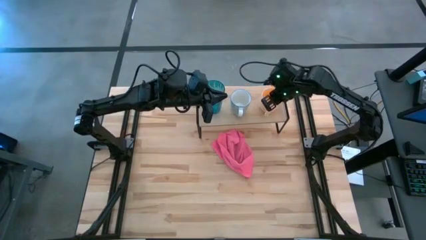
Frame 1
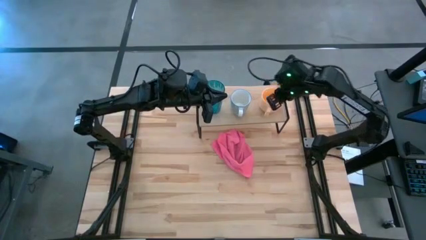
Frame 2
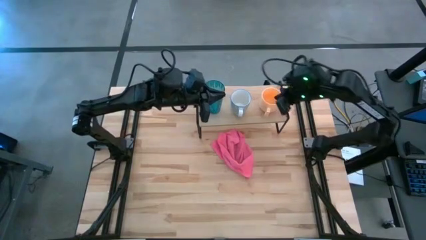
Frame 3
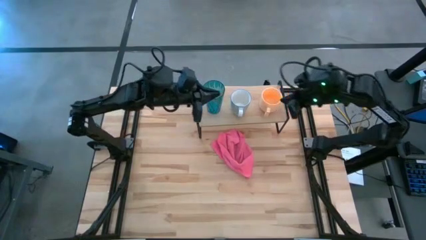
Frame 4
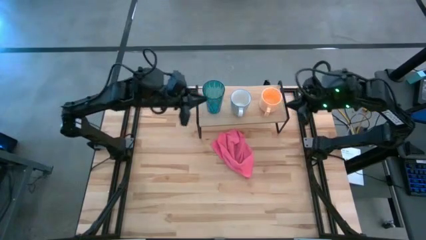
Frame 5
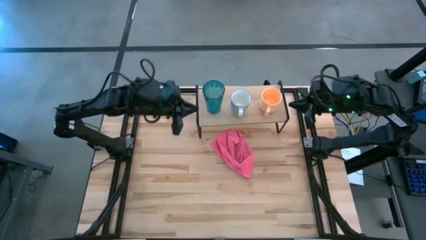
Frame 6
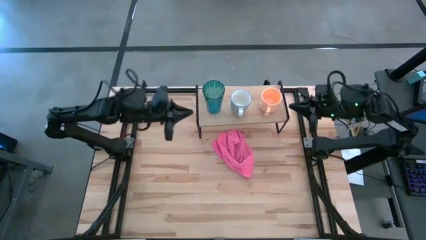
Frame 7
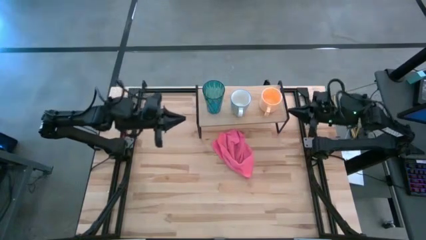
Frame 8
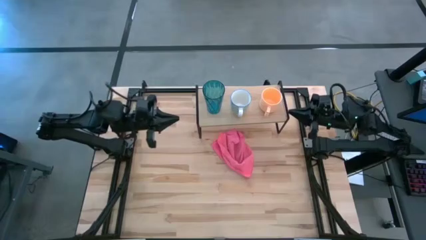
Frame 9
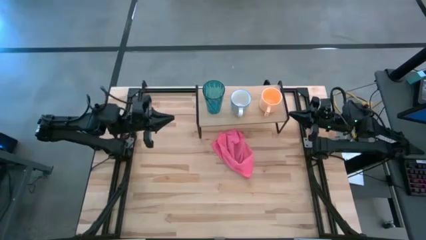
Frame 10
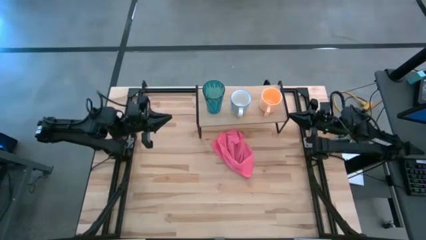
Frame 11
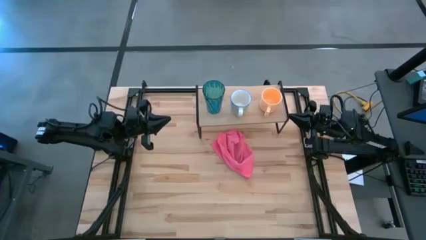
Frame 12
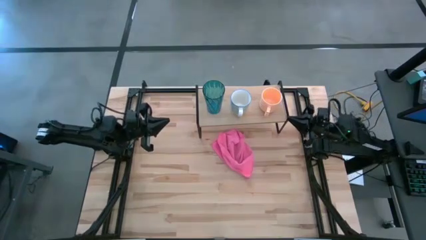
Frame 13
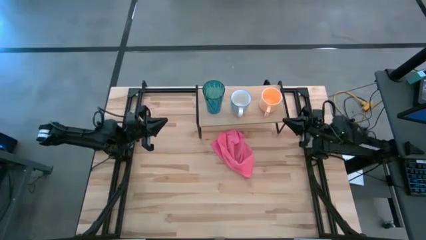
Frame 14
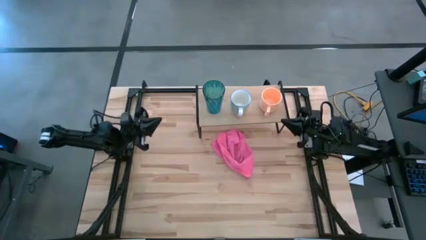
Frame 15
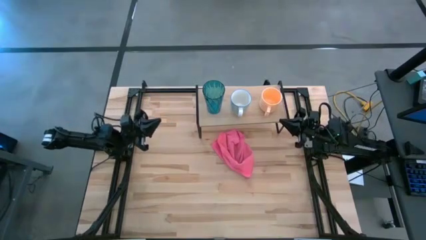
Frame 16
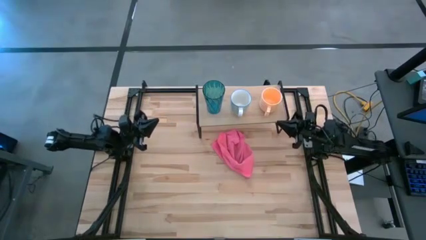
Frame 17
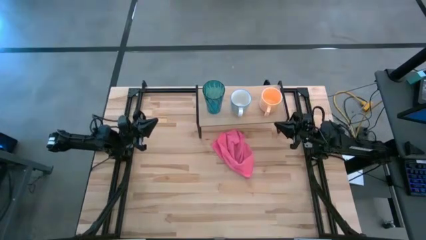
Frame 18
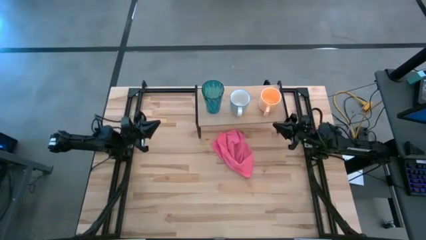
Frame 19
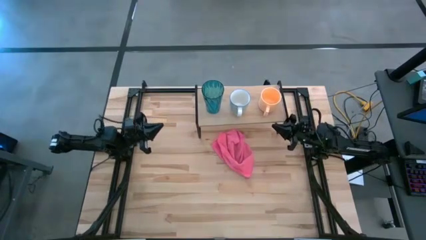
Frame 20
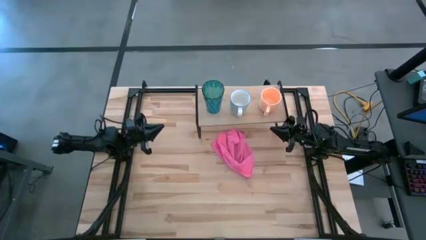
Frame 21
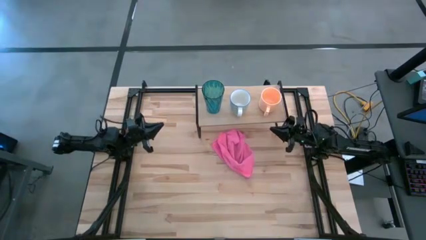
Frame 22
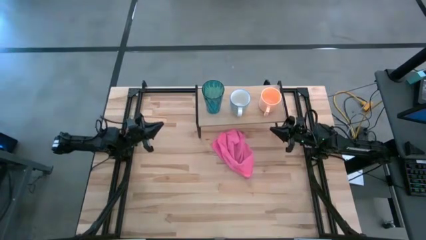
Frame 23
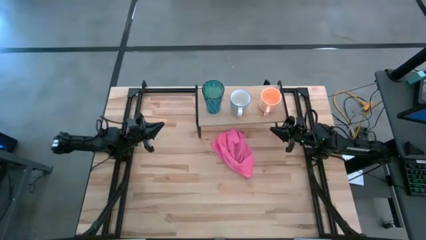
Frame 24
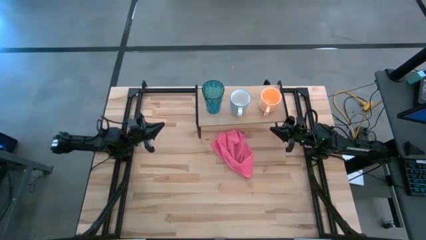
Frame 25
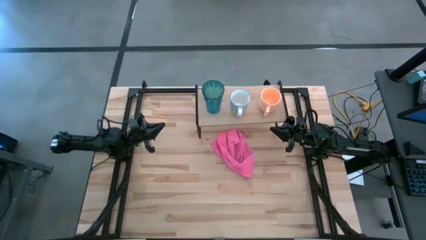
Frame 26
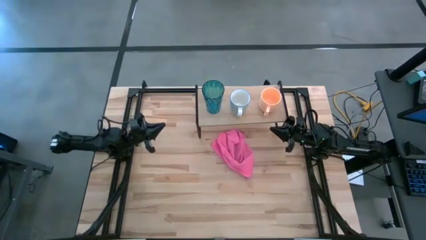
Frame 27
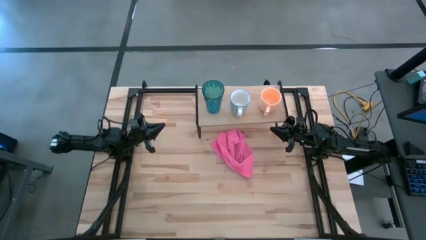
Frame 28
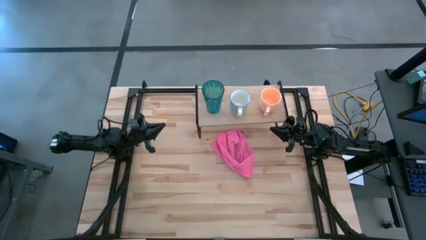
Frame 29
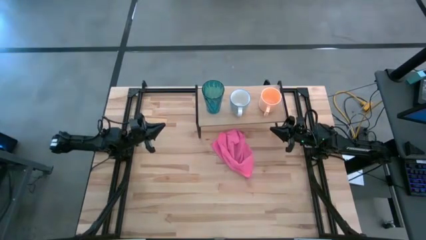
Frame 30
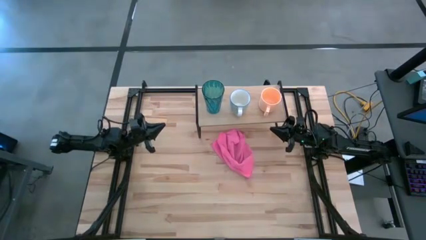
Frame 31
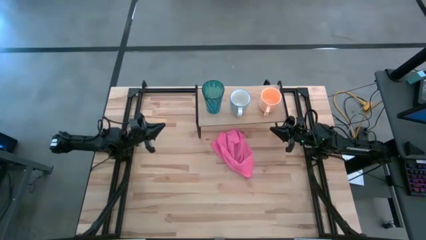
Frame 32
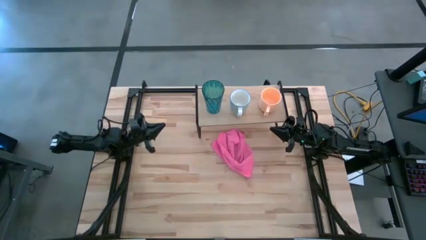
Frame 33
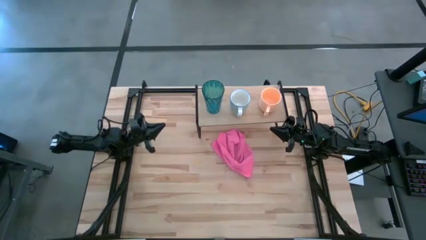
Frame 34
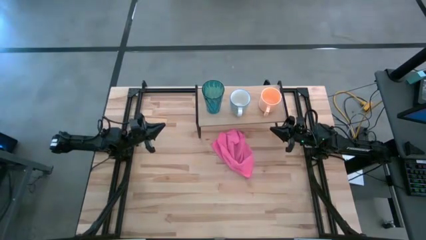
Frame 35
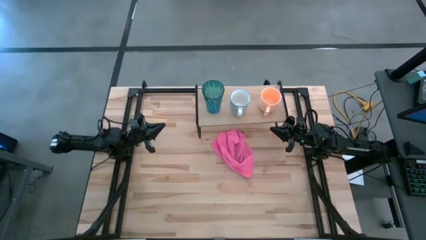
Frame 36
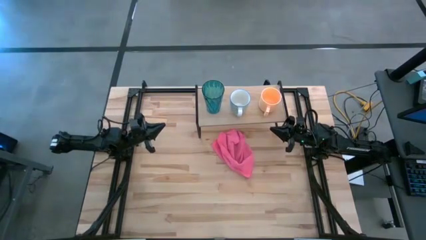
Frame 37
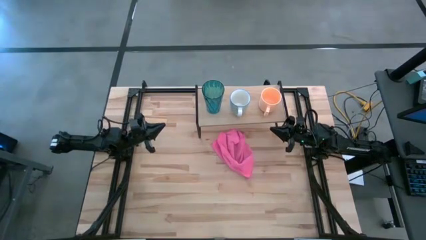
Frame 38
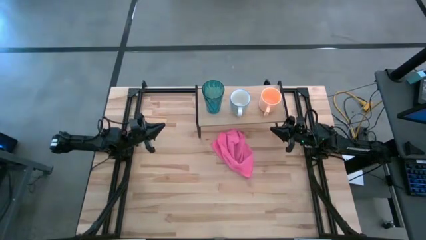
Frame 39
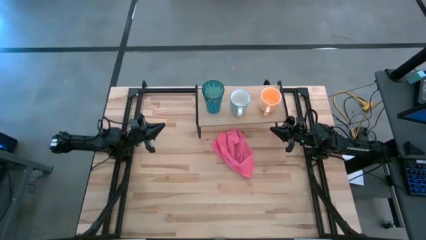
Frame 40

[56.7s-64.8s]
Task: Stack small to large cups/mugs on shelf
Return to home position

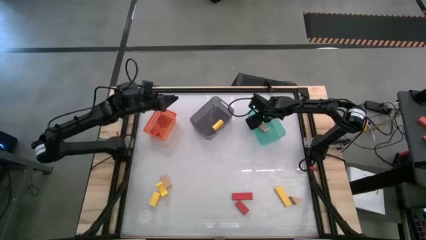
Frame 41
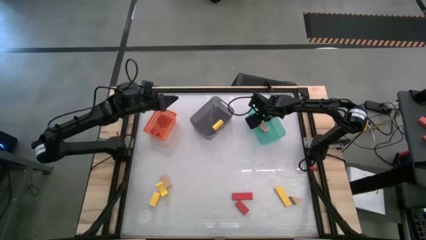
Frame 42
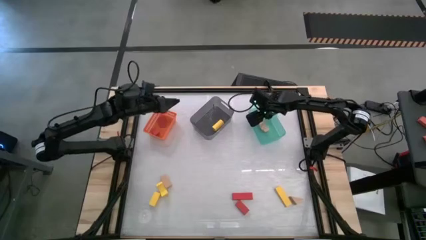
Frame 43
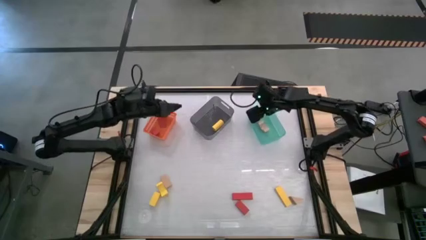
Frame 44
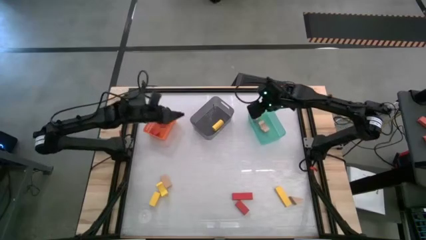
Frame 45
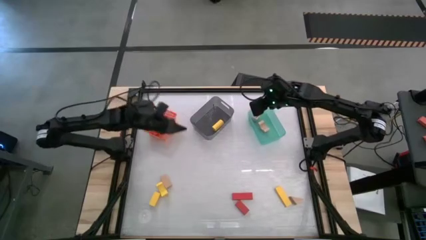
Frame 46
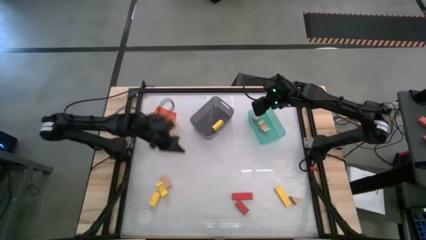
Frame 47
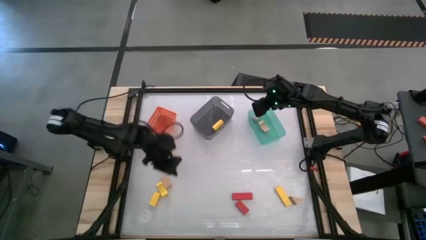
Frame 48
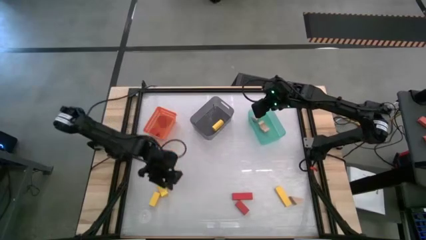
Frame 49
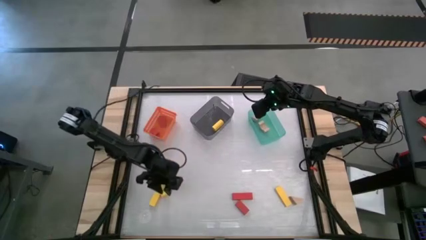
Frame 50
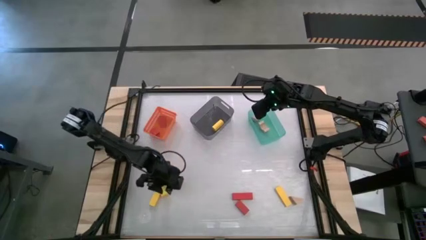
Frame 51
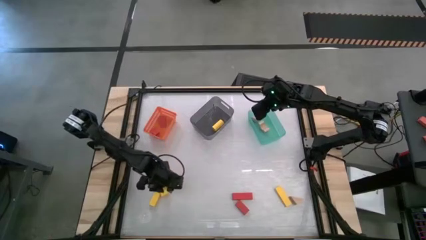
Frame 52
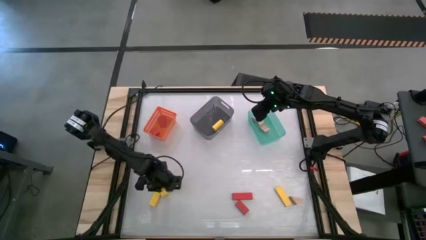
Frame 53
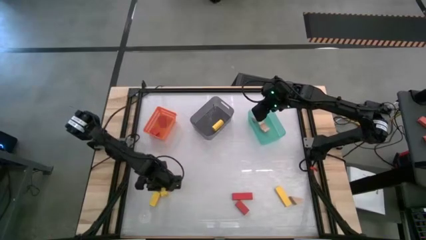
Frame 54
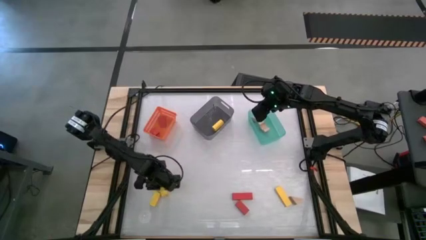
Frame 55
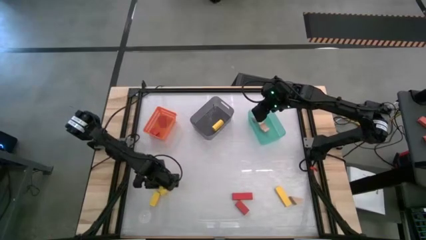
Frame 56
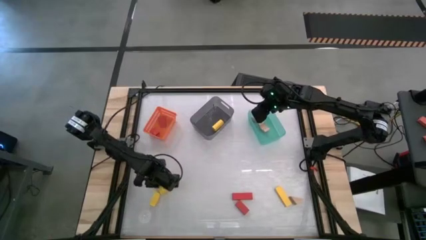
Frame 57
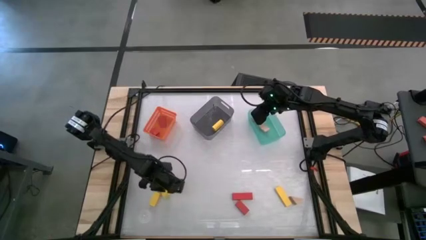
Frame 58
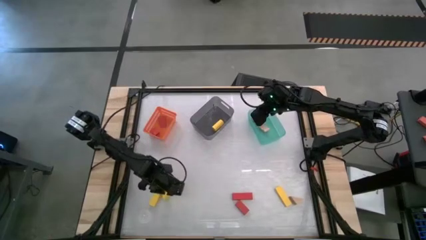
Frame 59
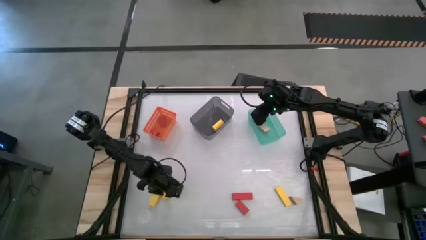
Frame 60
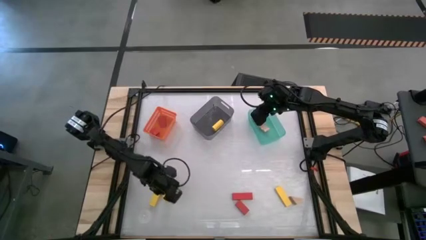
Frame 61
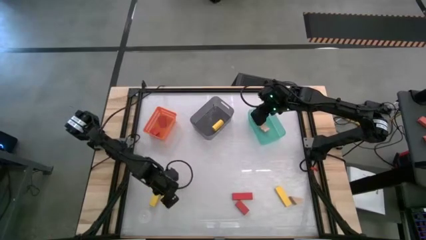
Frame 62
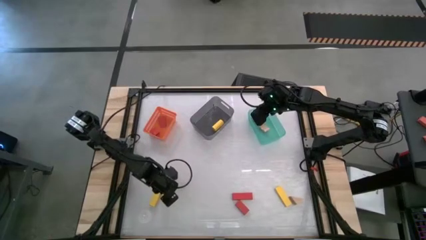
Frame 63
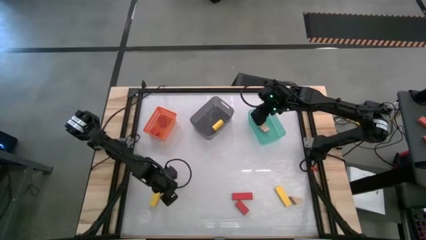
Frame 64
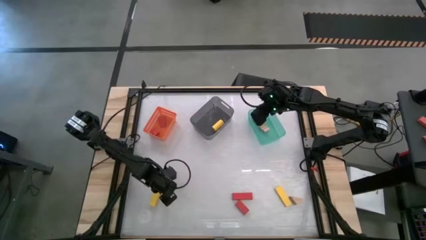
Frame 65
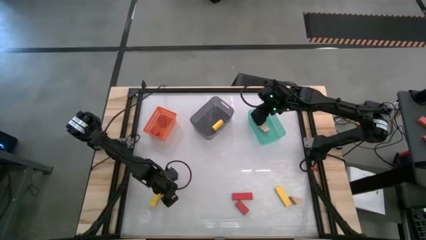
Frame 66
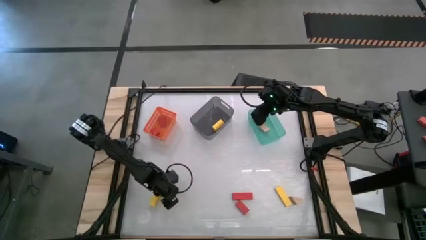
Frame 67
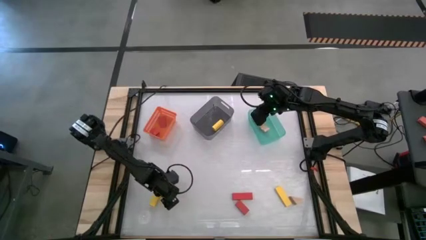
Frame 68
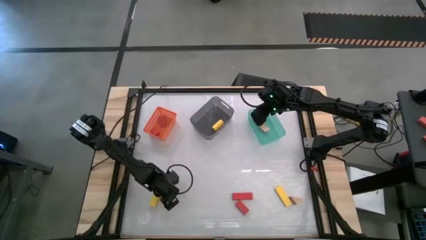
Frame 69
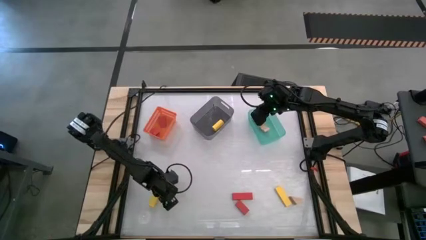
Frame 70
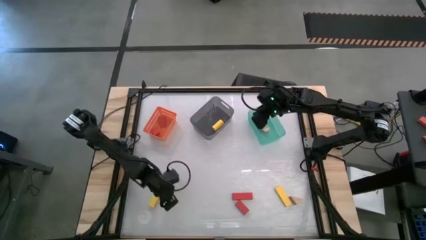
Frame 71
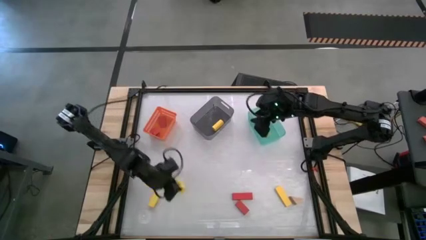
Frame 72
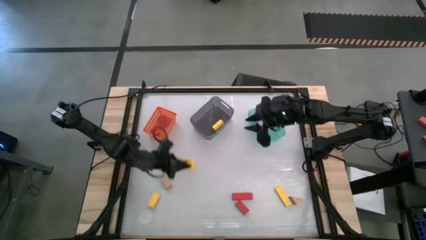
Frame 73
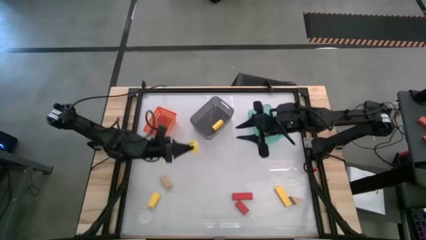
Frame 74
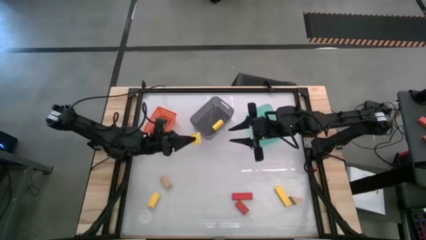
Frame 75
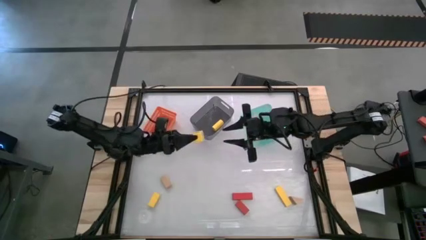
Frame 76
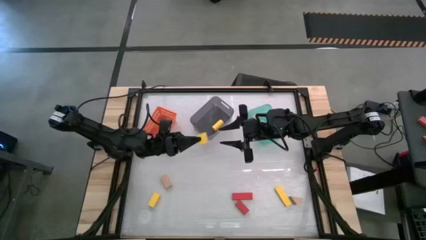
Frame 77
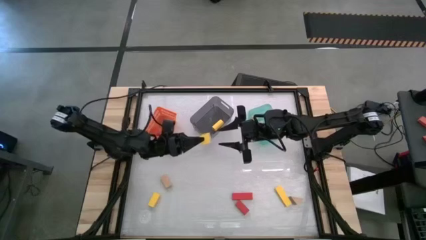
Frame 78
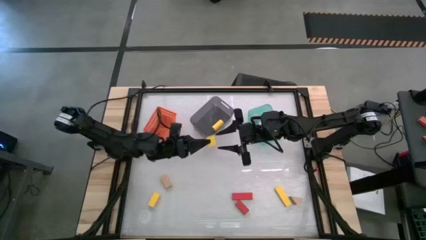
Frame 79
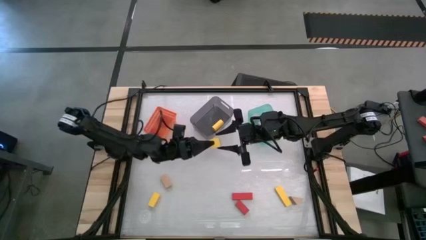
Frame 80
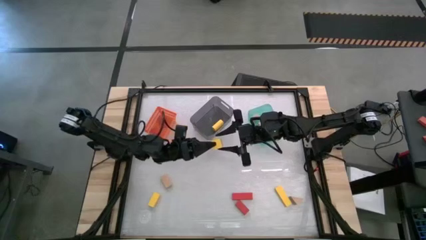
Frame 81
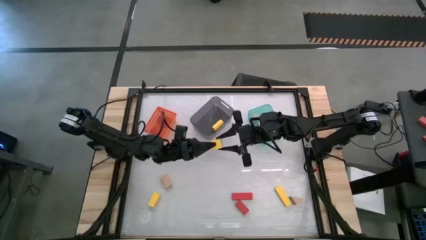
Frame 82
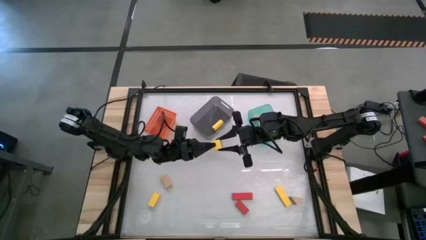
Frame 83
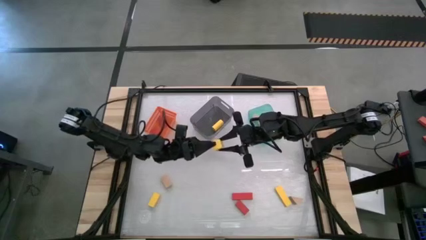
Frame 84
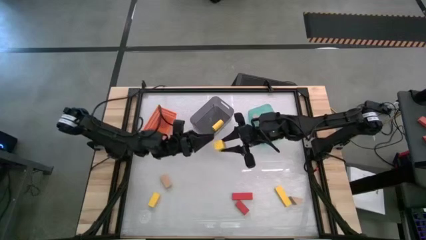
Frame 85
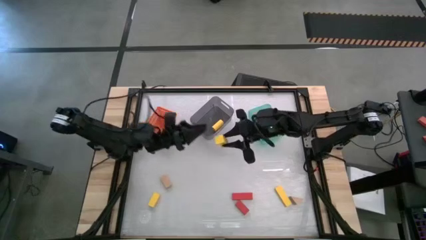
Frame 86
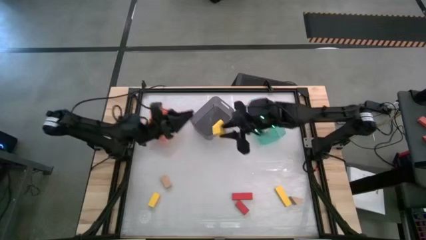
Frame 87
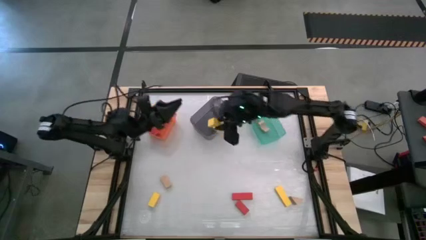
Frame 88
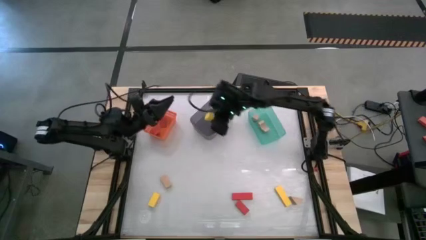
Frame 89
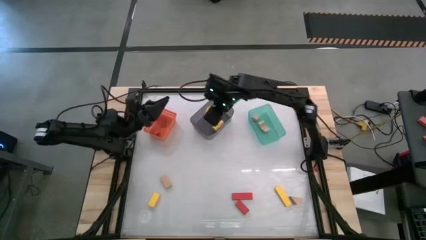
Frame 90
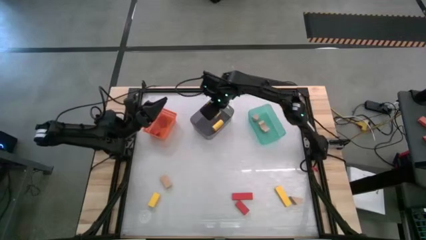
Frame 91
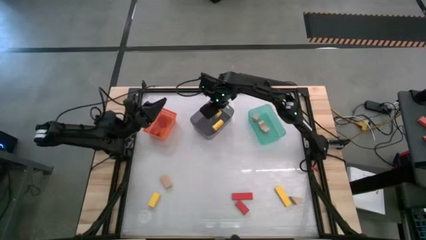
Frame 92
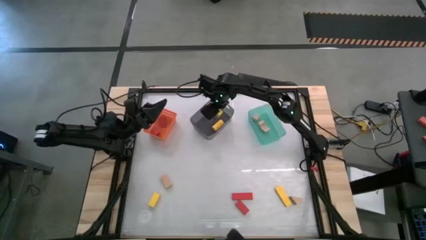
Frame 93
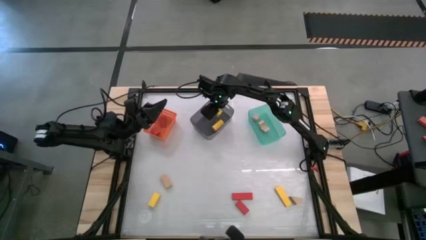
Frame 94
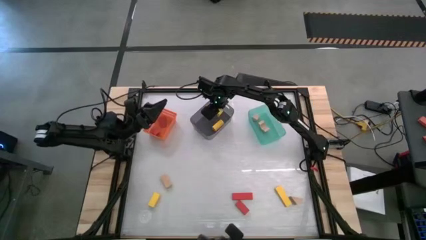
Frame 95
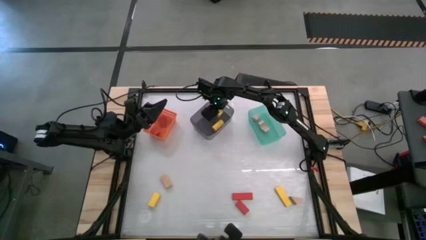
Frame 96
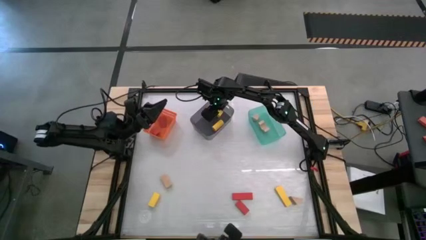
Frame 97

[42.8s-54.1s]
Task: Sort & place blocks by color
Put the yellow block into the black bin
